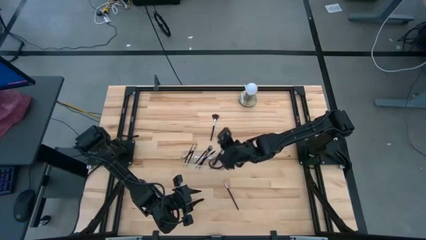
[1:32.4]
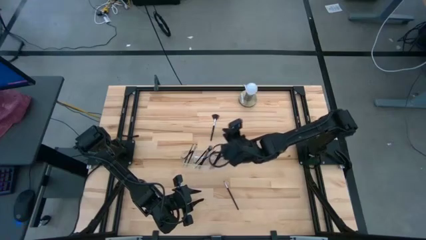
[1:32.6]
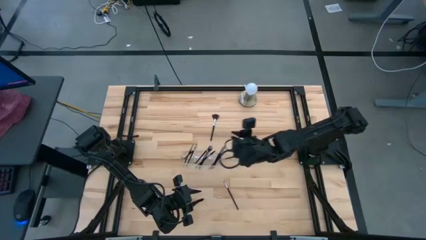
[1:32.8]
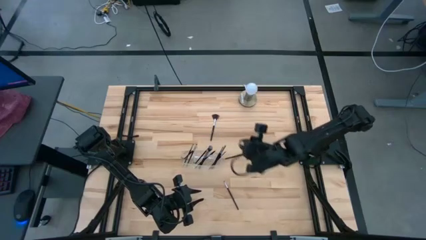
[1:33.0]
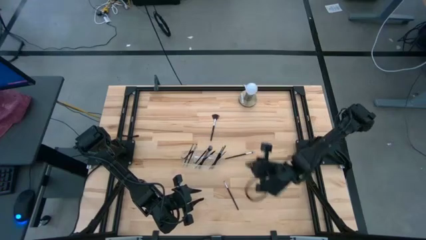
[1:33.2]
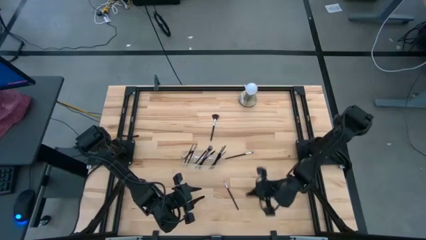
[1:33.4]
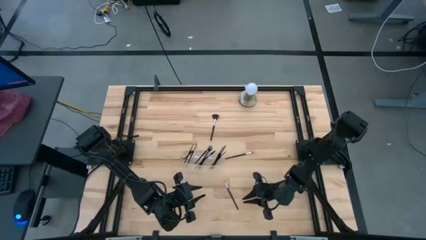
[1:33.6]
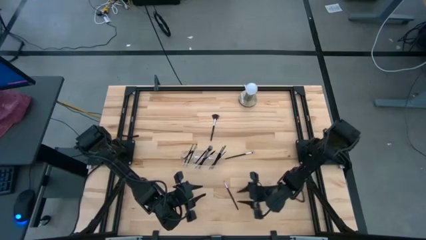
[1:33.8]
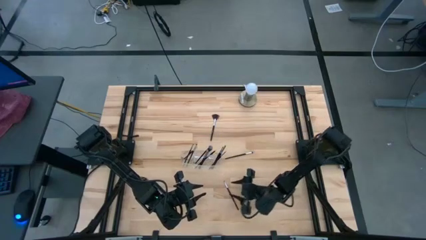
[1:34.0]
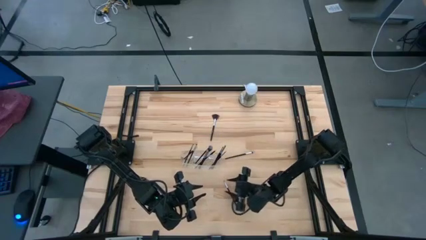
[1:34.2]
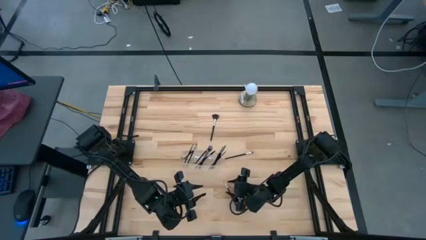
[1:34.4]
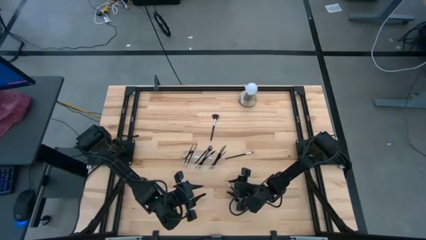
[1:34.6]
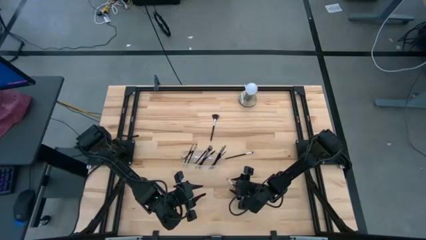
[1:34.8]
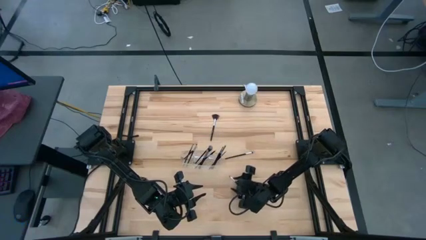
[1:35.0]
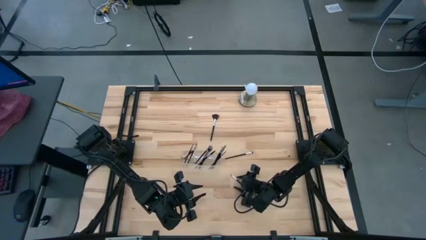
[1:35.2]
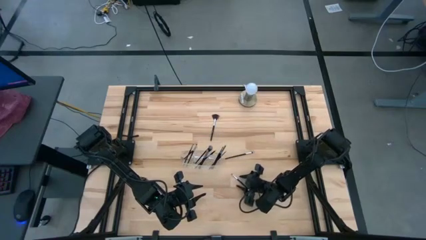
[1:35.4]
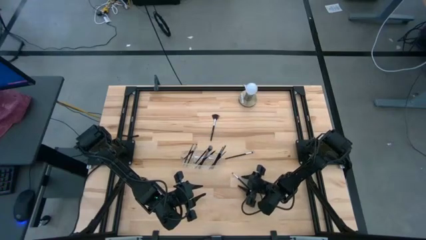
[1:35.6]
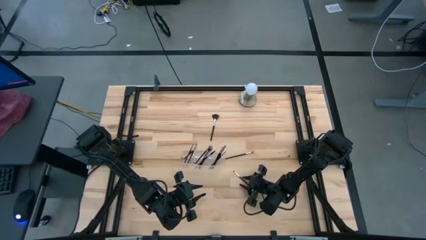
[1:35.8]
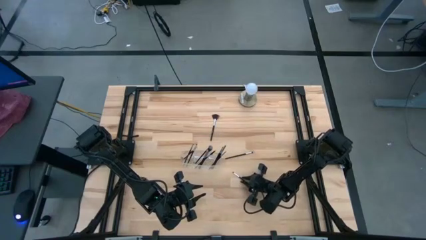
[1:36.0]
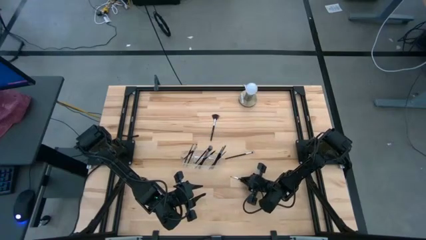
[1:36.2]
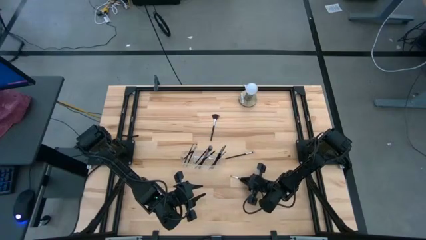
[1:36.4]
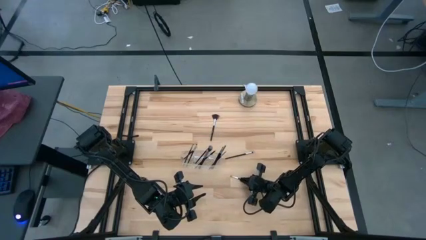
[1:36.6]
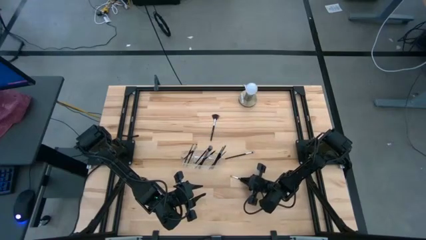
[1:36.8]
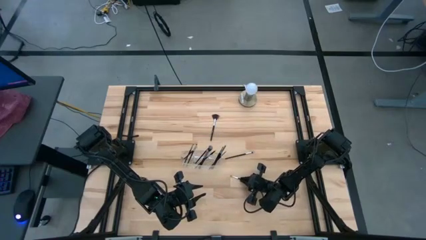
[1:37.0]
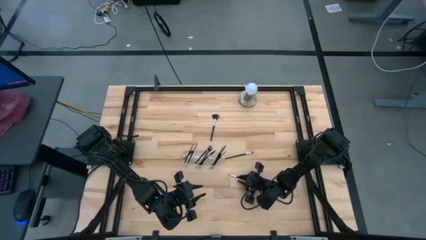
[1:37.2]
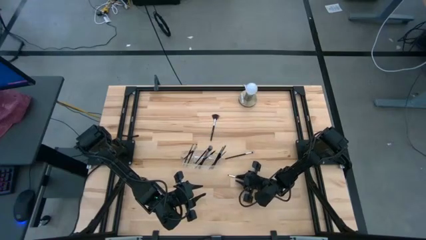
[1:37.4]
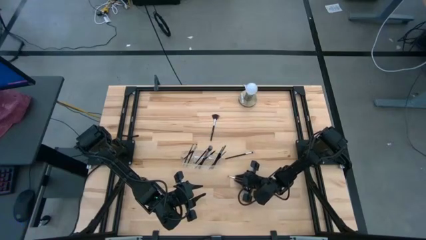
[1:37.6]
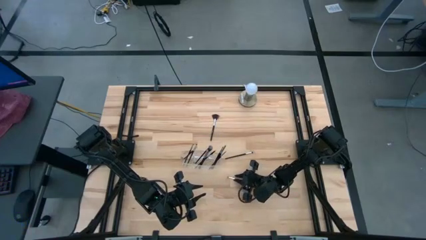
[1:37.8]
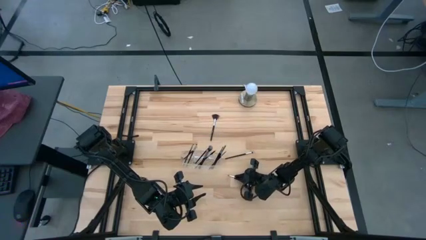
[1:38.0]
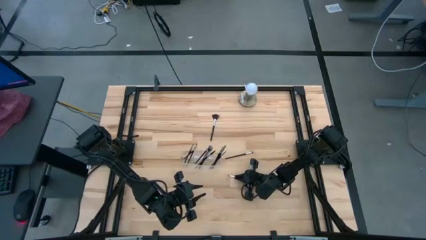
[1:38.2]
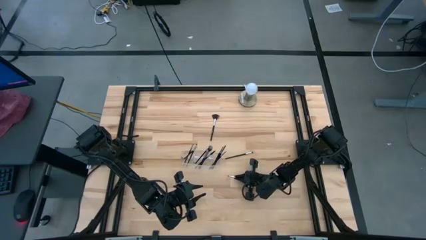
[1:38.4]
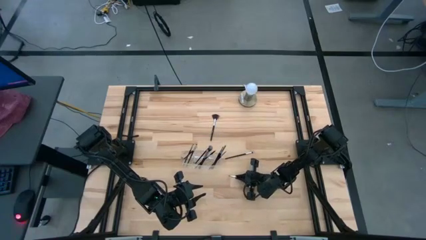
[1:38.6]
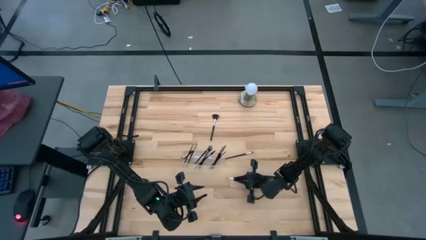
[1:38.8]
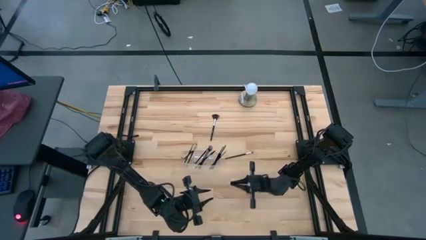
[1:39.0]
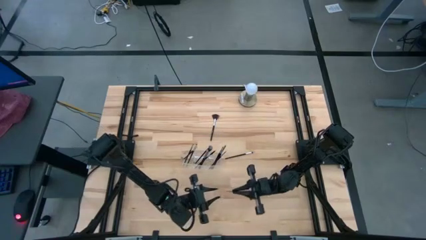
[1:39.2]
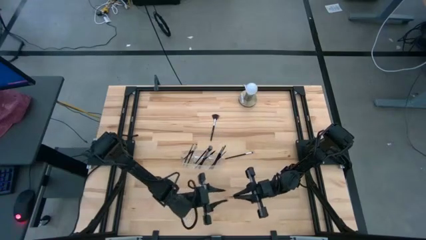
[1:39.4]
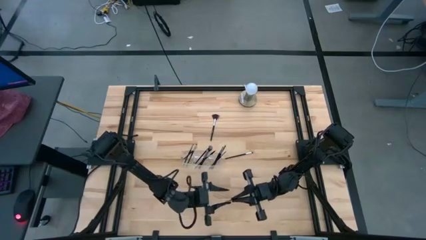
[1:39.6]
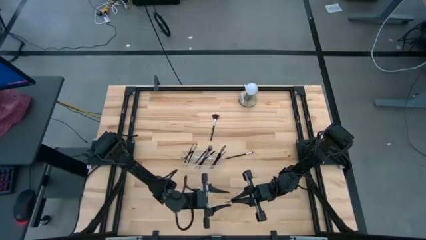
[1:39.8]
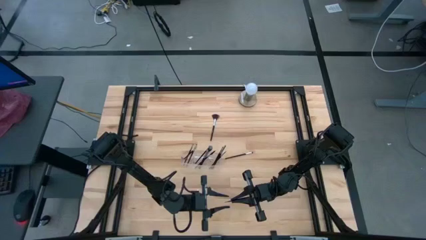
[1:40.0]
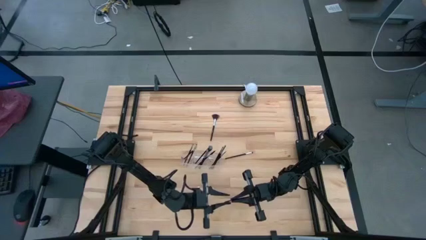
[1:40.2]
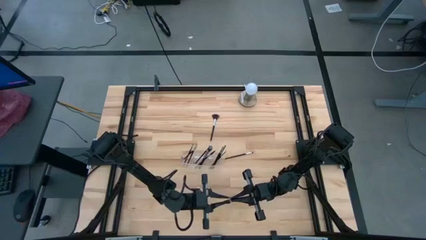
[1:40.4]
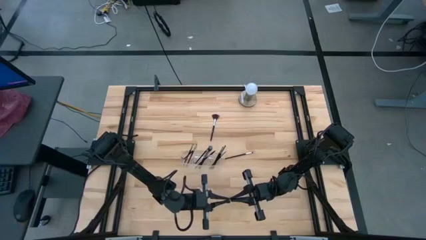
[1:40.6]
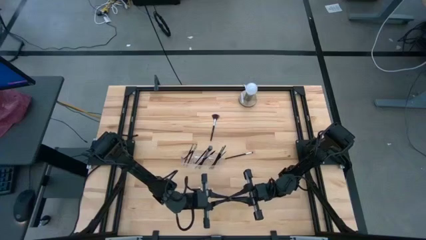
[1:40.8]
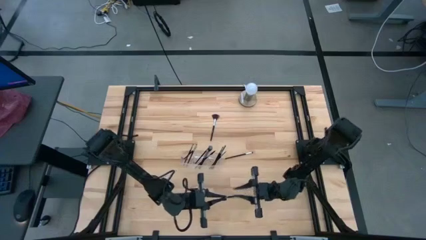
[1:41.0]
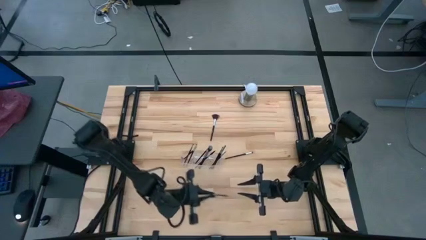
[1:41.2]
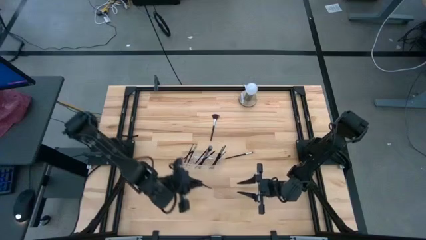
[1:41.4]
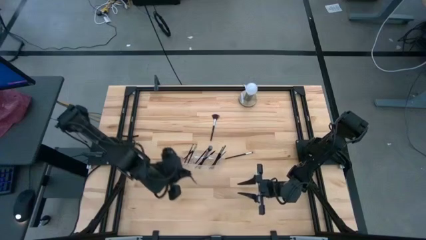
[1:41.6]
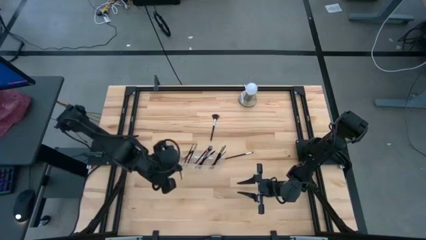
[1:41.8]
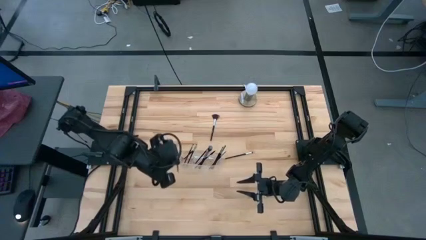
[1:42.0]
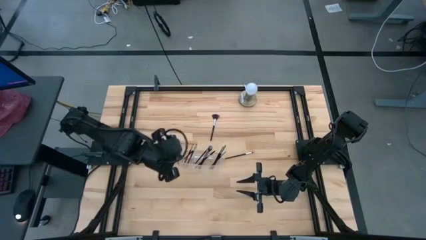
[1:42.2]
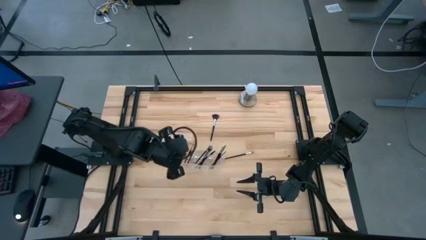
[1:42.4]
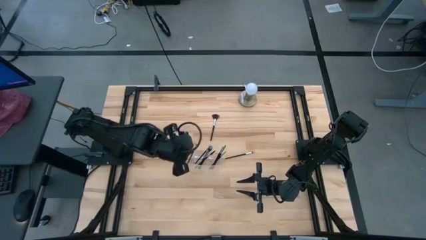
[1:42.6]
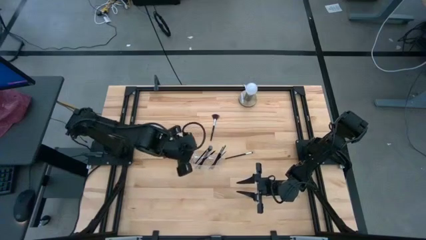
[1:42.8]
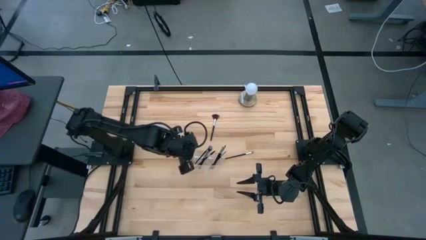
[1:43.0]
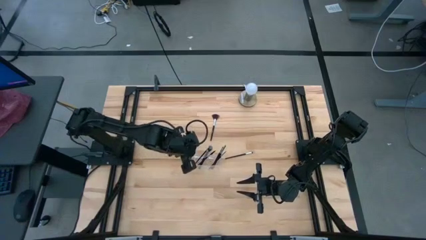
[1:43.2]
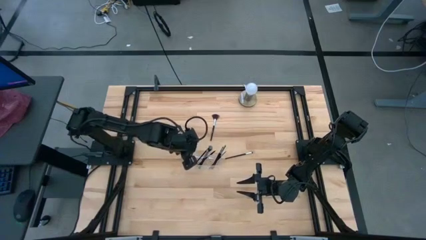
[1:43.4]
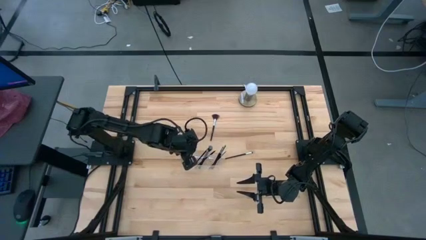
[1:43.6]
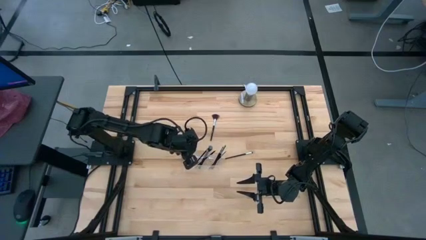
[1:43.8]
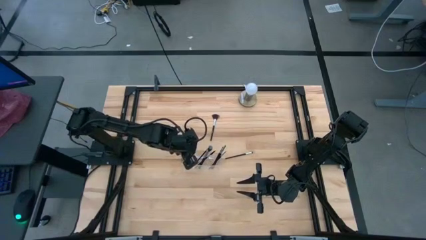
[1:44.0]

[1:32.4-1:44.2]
Task: Put items in baskets/containers
Put the eyeshadow brush into the transparent organizer

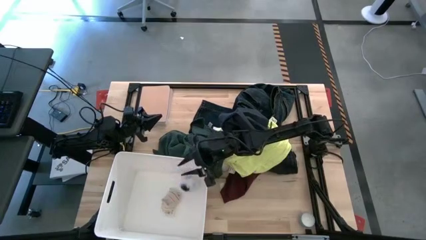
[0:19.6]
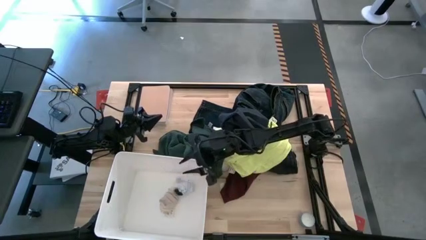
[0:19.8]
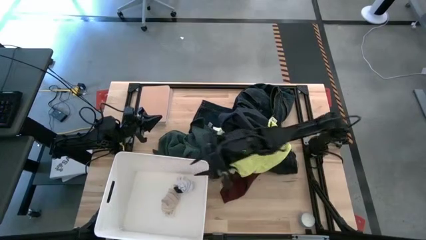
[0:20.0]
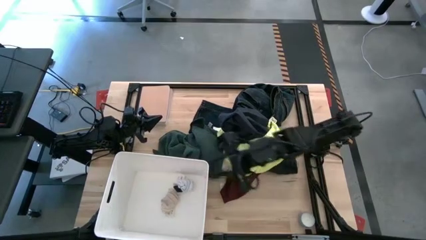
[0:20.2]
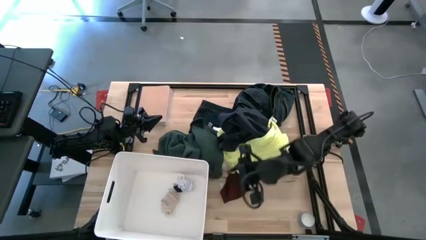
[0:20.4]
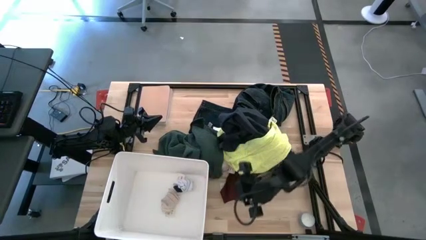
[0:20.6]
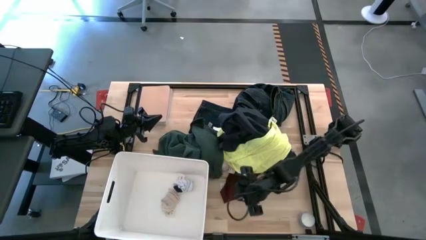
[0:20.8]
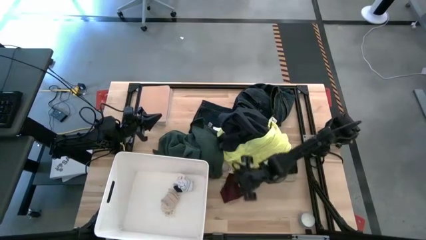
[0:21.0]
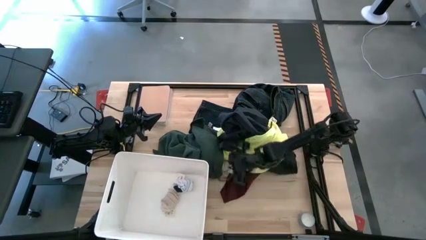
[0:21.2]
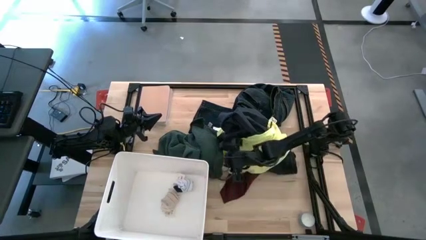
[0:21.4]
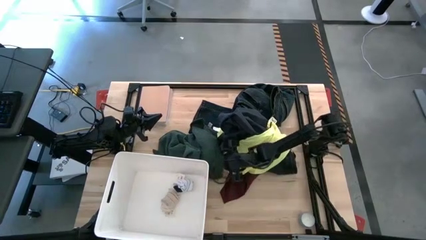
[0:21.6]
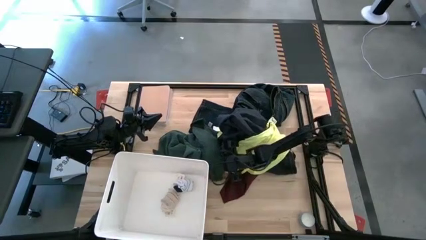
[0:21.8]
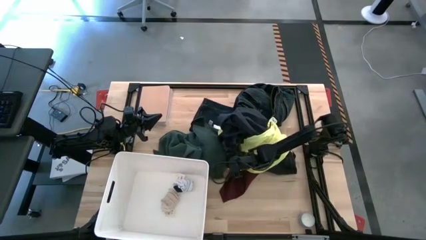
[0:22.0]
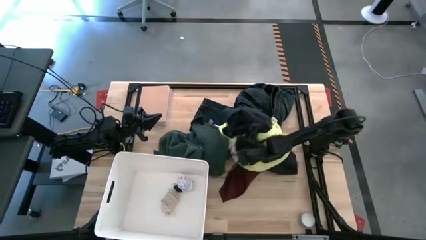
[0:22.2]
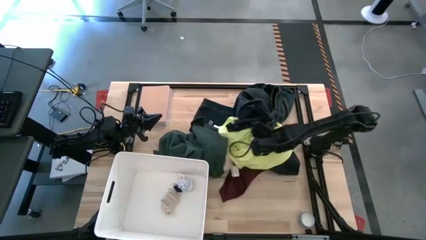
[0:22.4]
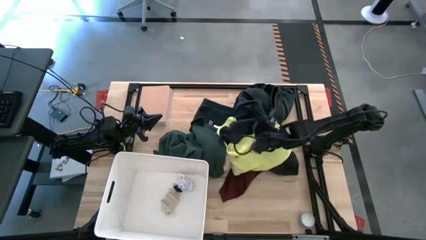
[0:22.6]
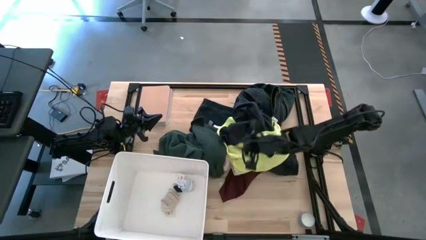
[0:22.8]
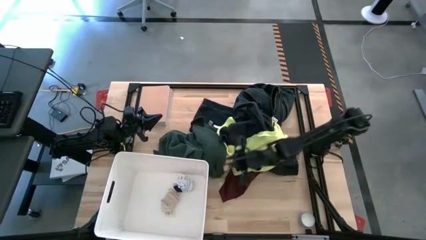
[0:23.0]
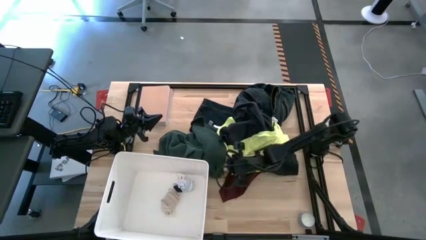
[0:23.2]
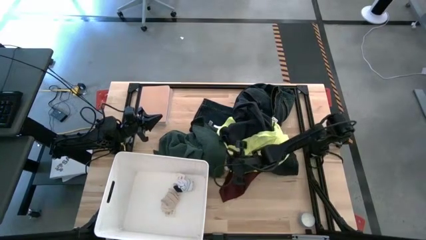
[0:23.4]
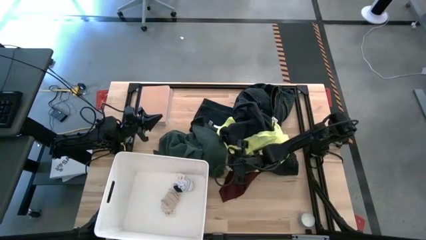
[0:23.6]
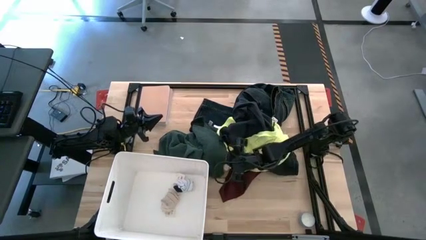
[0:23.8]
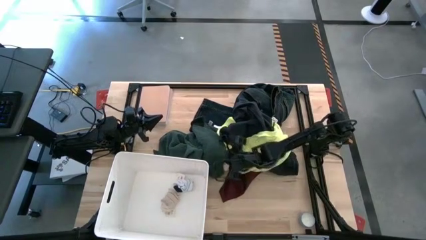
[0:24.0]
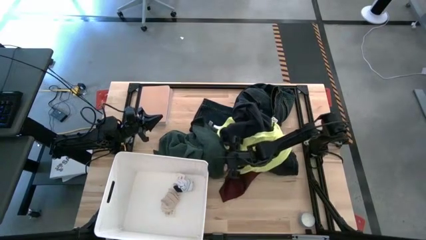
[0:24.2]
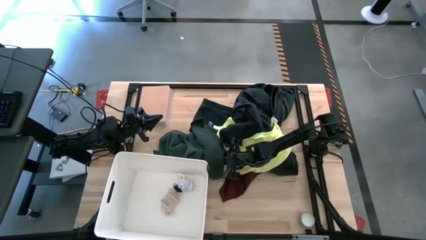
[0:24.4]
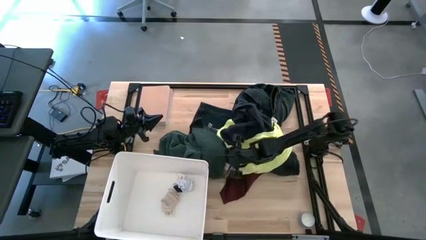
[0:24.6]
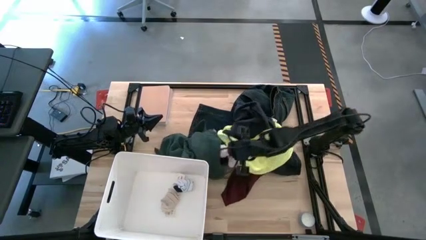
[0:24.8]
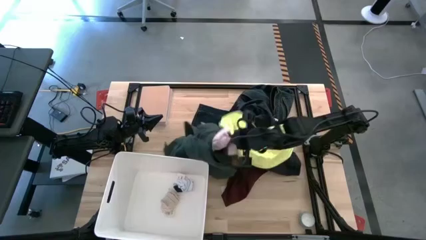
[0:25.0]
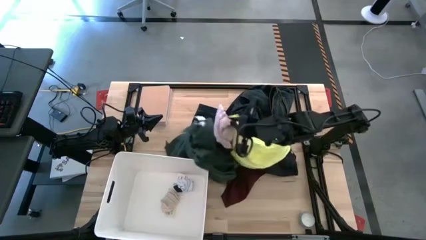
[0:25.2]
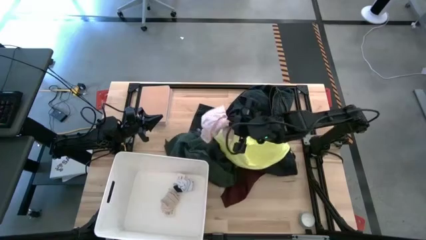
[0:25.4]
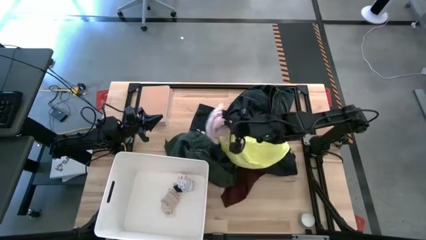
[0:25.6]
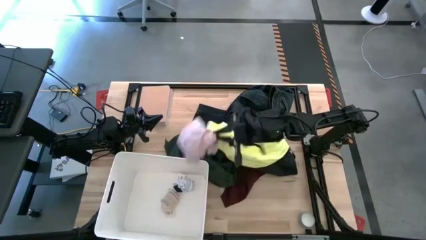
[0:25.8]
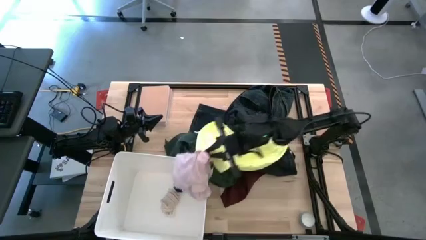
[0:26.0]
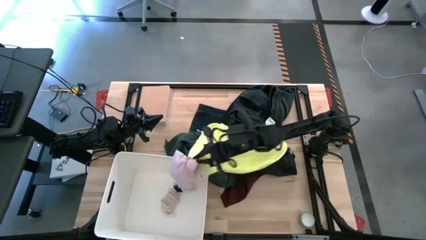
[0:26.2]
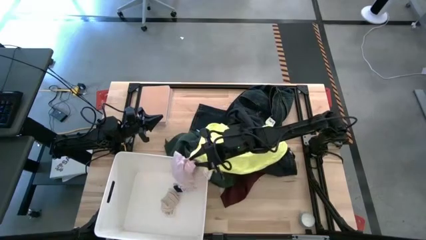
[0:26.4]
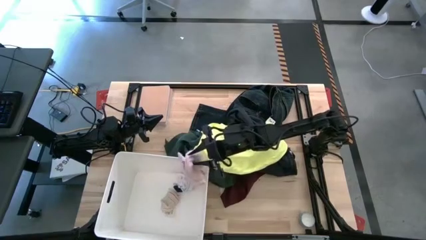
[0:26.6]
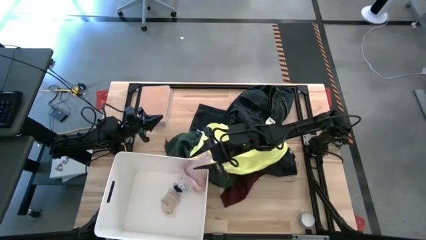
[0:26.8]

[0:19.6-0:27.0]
Task: Sort clothes
Put the pink underwear into the white bin
